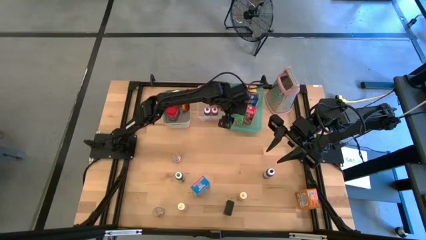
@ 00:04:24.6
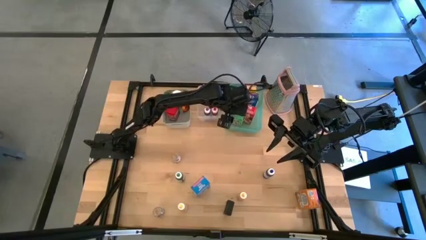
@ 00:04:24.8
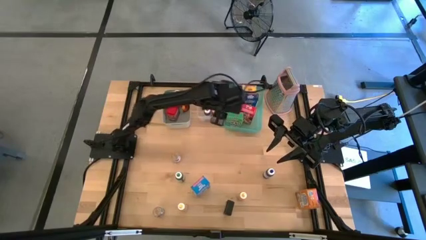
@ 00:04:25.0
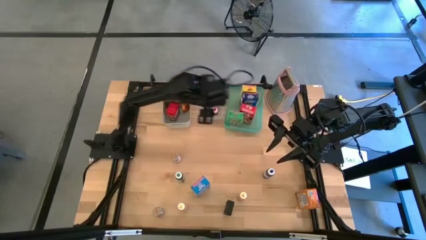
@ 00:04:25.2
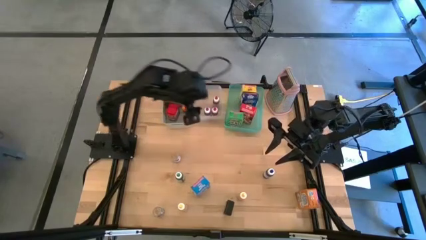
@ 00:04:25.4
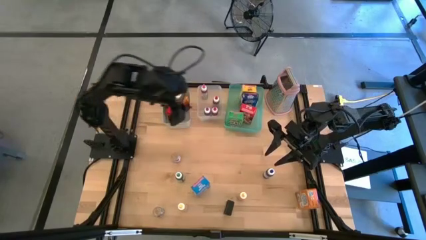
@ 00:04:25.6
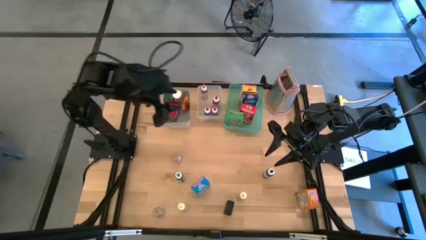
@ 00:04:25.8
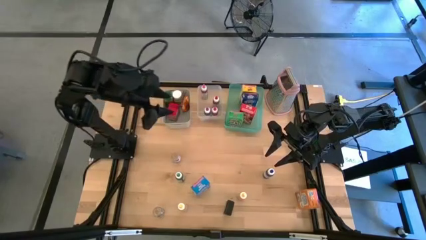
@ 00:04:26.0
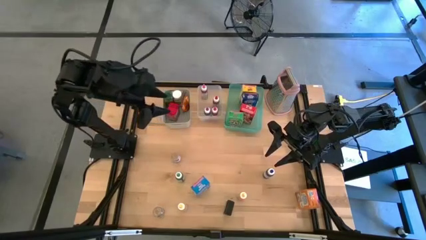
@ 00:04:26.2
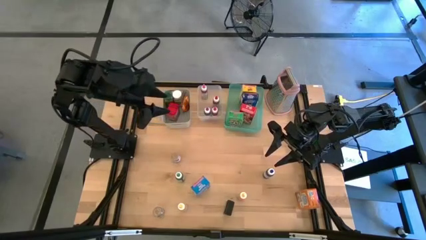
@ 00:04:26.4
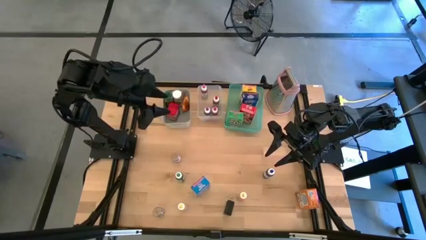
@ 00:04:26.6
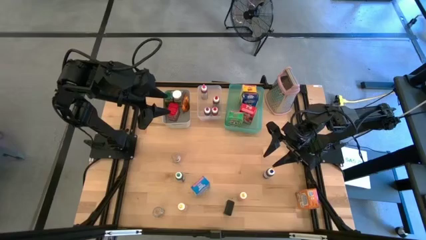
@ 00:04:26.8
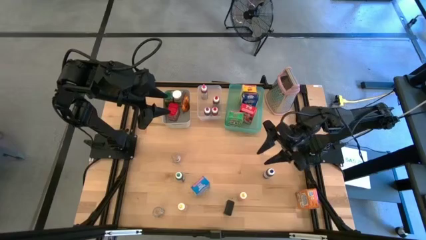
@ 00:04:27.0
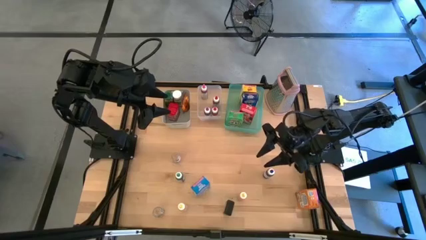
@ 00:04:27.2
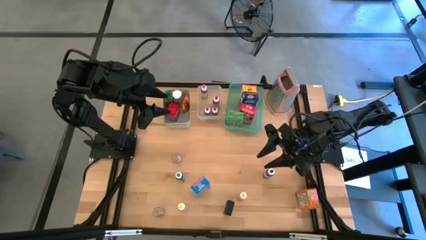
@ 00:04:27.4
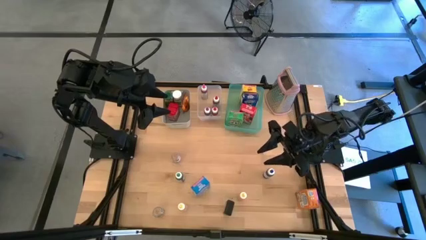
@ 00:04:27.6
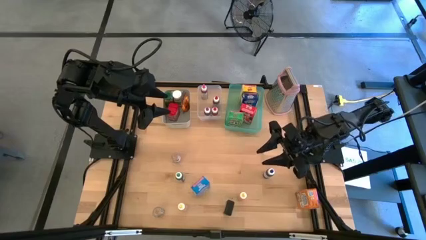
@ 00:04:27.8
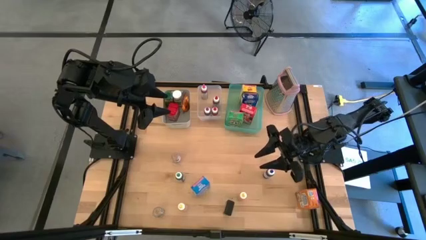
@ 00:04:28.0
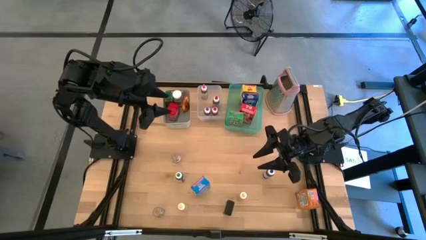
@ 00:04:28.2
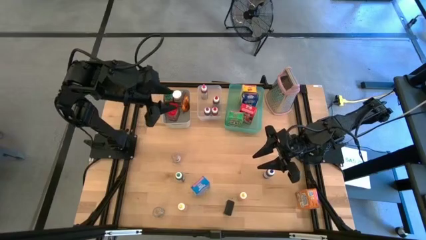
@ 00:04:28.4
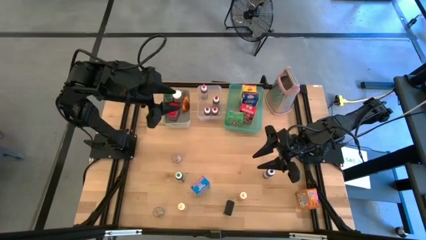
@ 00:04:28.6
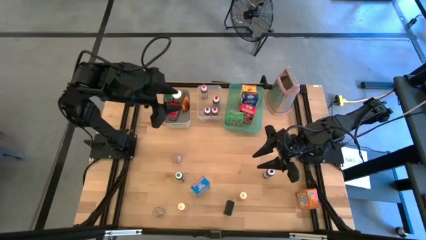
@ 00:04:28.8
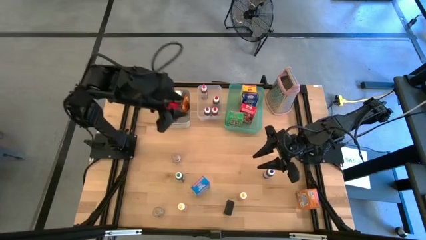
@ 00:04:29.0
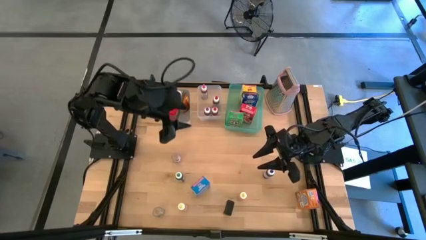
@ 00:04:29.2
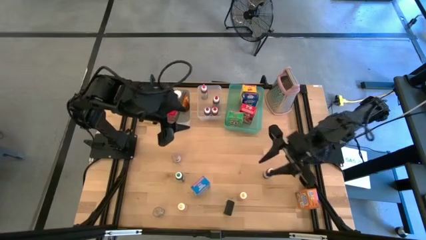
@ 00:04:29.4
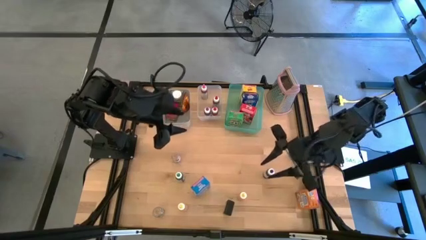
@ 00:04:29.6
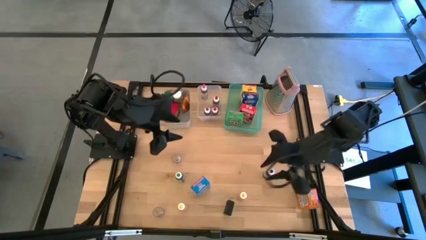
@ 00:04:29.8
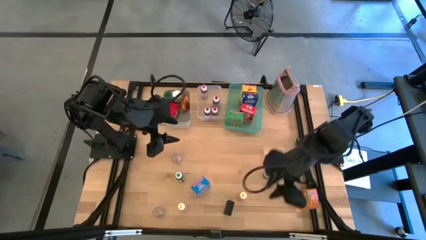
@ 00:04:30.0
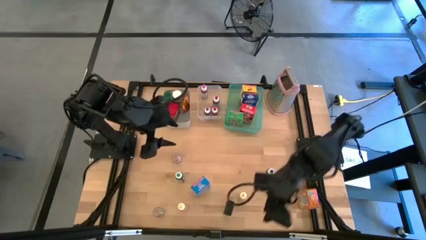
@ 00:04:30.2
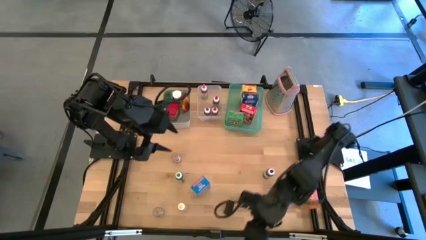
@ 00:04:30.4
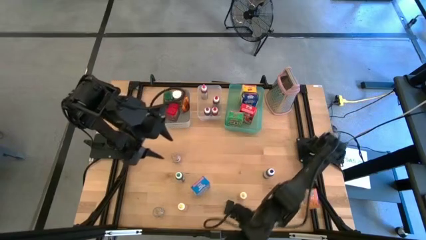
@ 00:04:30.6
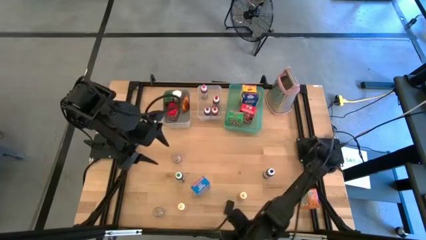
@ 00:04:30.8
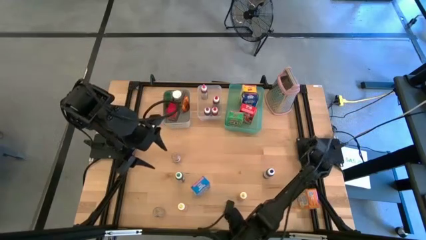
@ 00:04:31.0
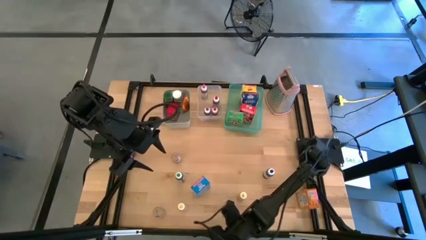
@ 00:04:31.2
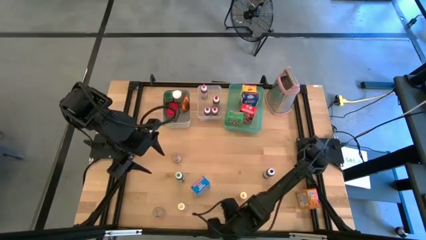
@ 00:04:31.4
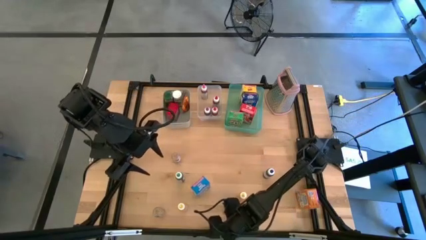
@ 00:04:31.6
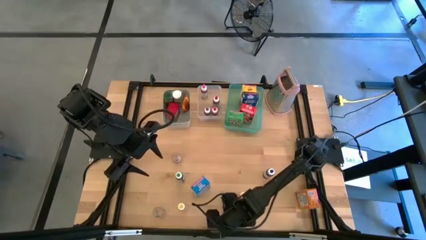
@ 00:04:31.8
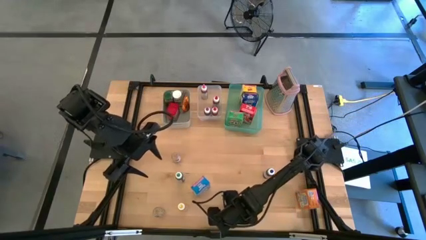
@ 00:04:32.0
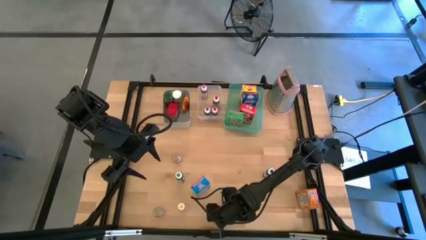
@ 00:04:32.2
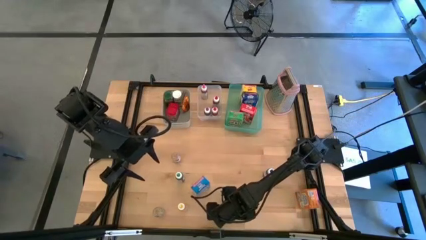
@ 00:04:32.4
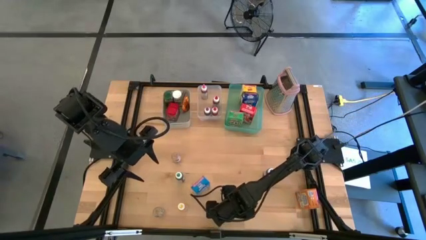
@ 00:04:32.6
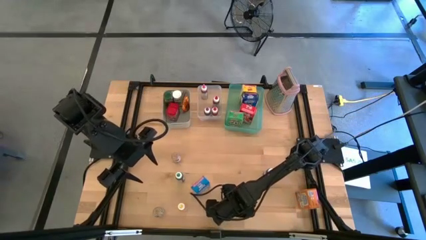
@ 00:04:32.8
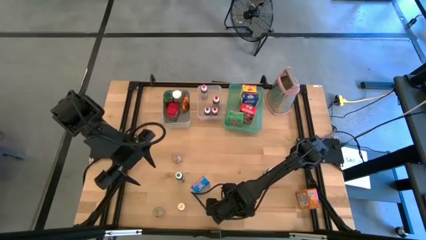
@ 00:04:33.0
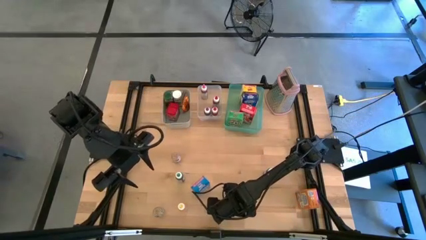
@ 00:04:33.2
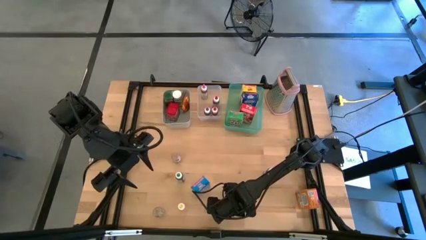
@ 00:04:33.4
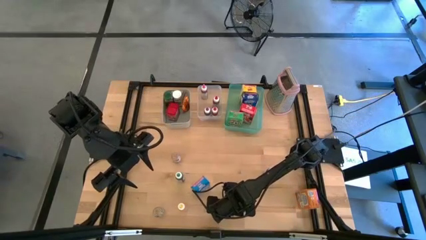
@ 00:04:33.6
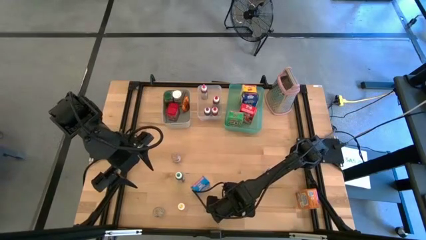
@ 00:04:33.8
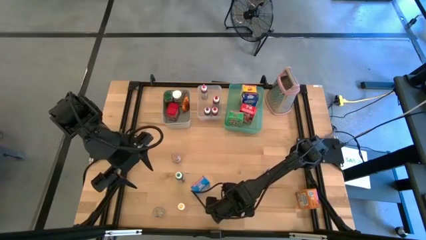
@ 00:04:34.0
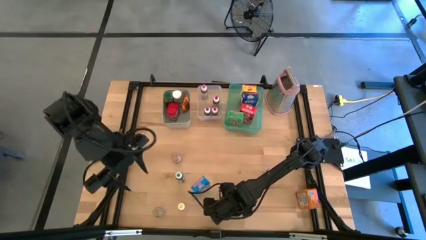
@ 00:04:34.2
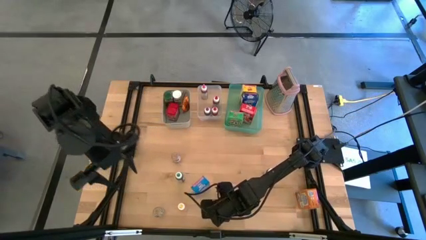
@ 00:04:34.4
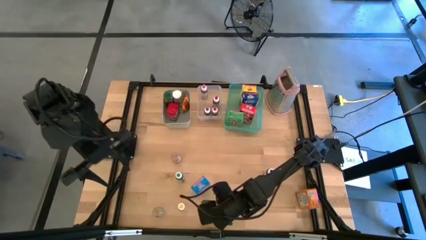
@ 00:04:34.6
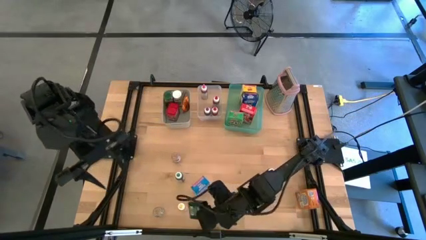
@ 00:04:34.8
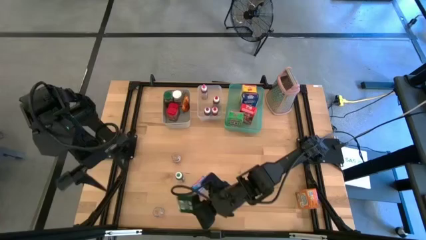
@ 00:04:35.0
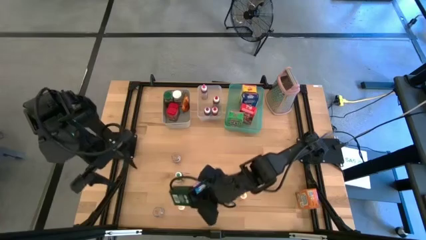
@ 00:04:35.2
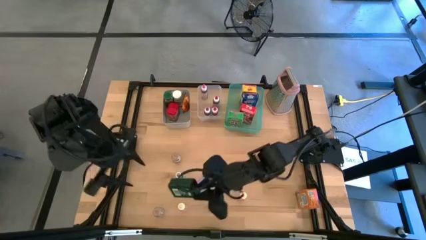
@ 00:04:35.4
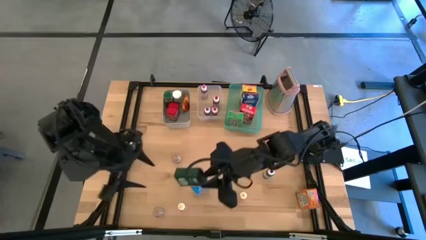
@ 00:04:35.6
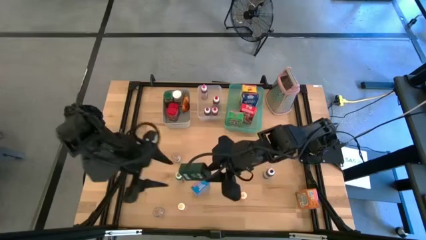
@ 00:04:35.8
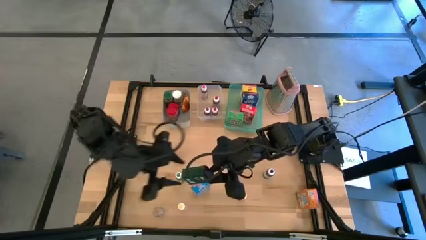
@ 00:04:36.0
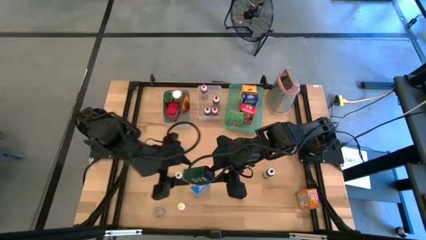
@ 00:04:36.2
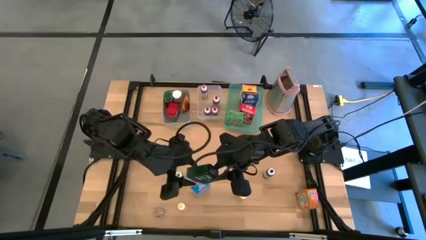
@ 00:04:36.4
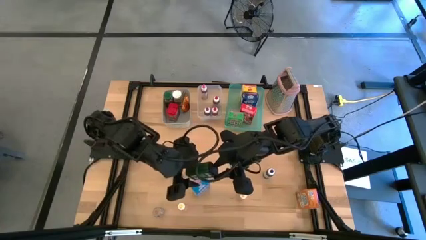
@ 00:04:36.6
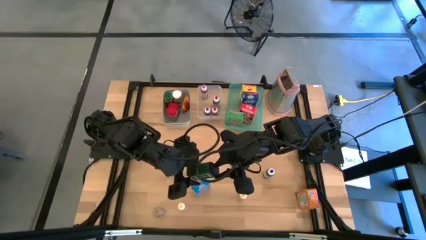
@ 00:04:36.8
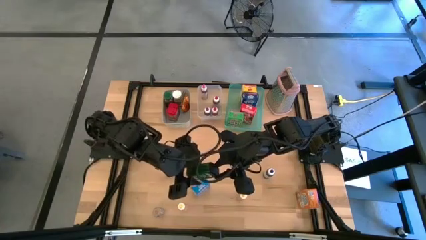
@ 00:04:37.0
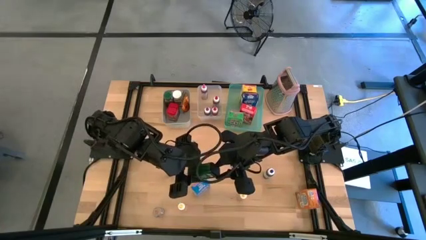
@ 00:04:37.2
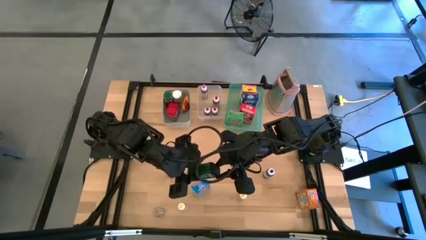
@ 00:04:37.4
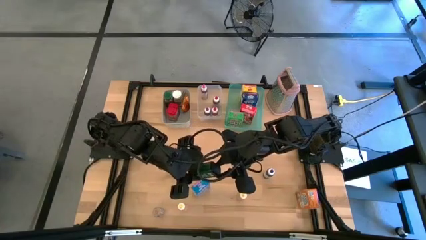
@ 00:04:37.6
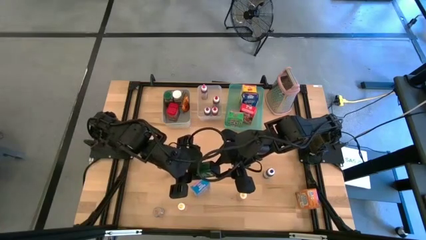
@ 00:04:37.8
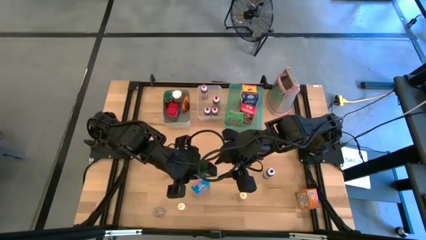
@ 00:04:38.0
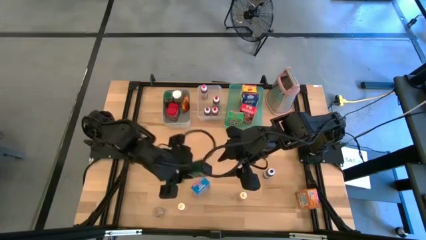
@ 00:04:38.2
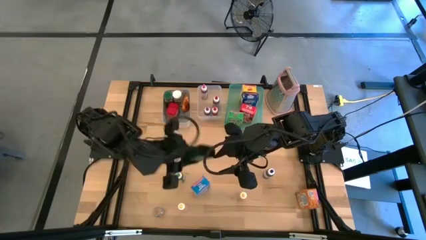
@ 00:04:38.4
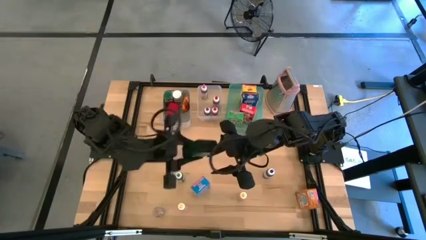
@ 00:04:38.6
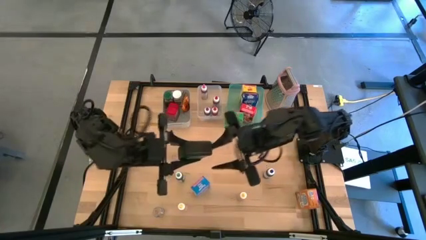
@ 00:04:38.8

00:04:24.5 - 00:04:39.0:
Task: Pick & Place Kitchen Items
Put the black seasoning can into the gray bin
